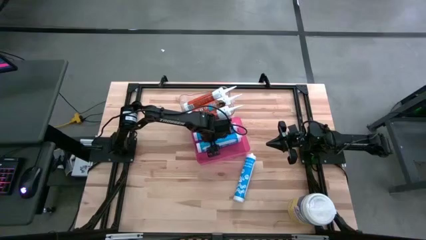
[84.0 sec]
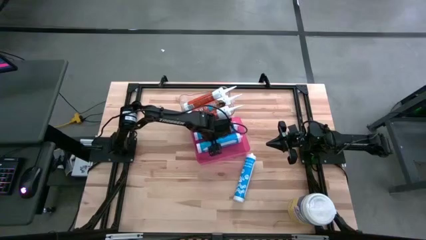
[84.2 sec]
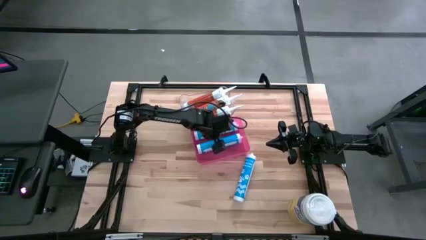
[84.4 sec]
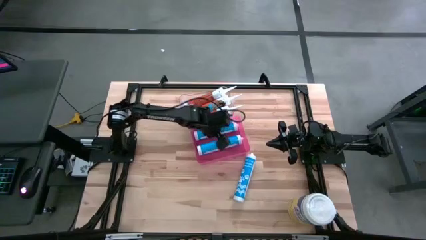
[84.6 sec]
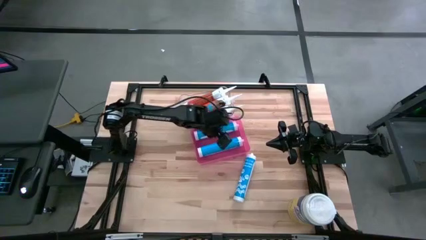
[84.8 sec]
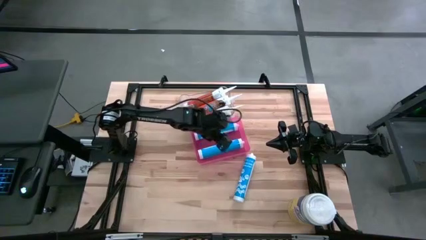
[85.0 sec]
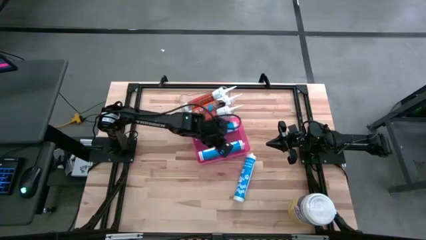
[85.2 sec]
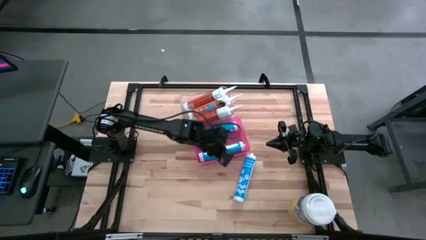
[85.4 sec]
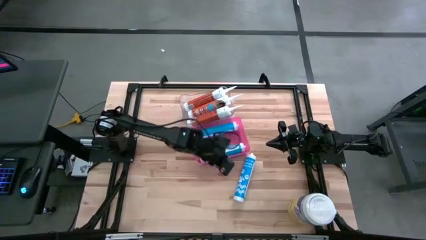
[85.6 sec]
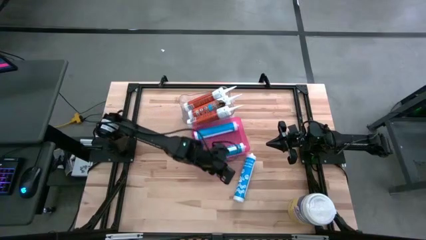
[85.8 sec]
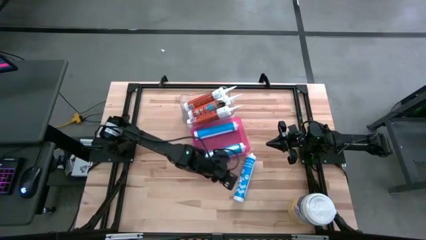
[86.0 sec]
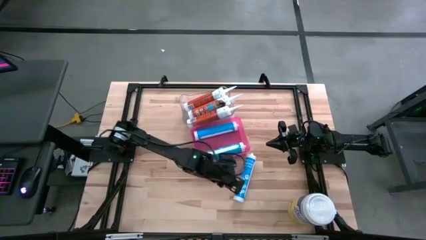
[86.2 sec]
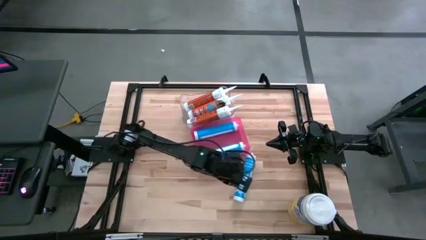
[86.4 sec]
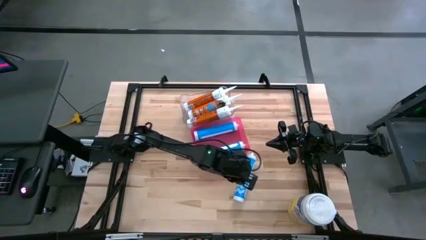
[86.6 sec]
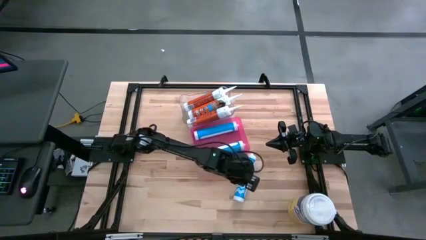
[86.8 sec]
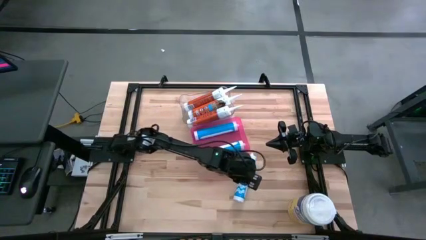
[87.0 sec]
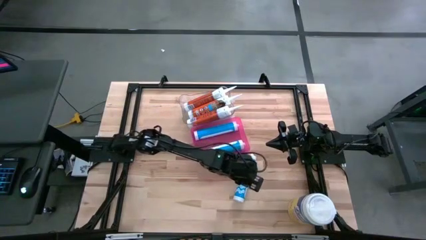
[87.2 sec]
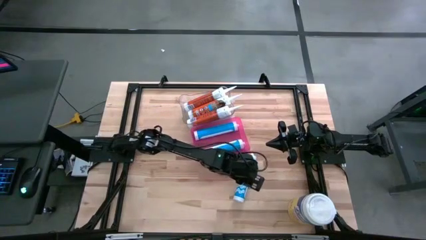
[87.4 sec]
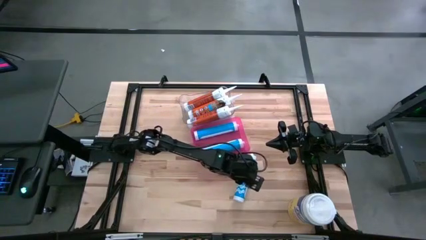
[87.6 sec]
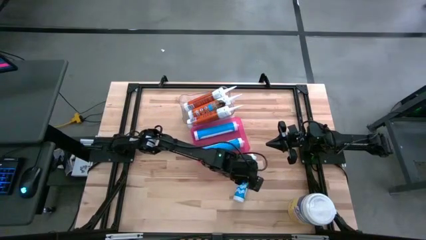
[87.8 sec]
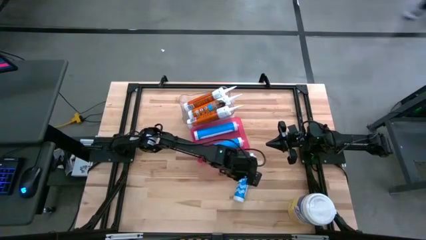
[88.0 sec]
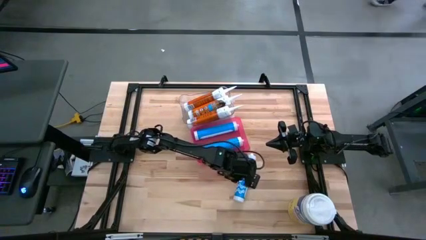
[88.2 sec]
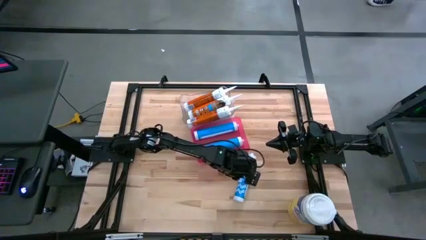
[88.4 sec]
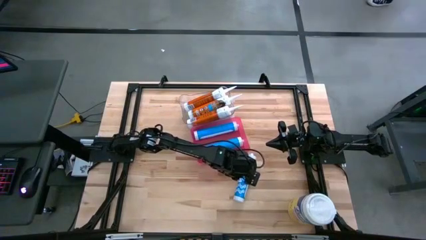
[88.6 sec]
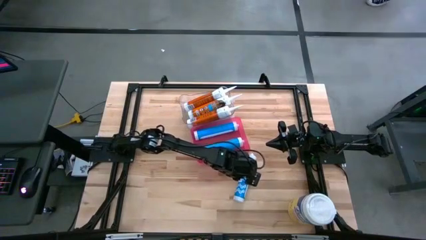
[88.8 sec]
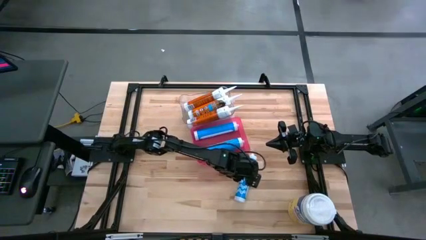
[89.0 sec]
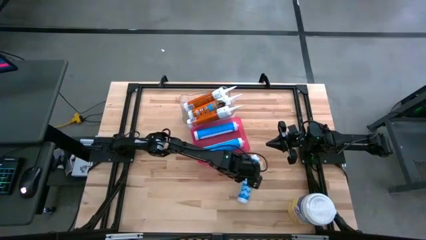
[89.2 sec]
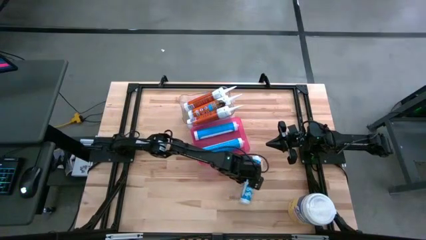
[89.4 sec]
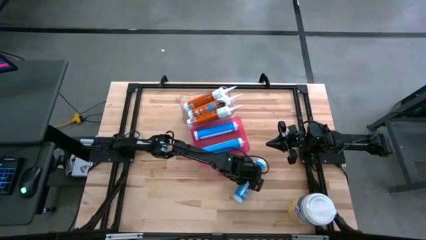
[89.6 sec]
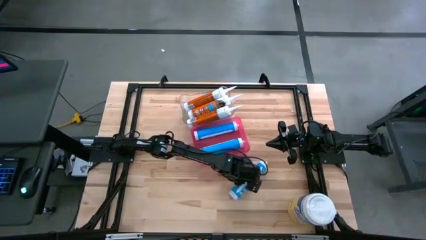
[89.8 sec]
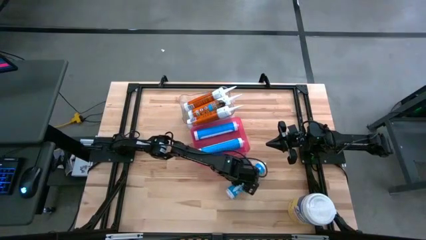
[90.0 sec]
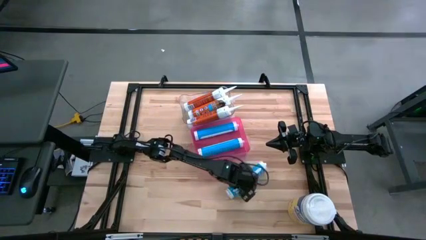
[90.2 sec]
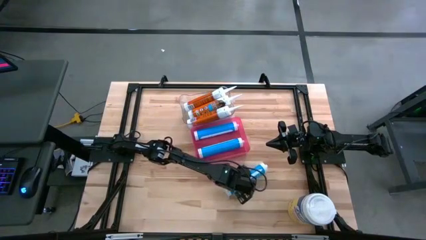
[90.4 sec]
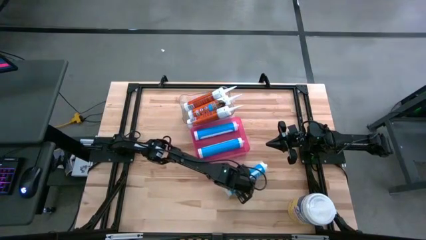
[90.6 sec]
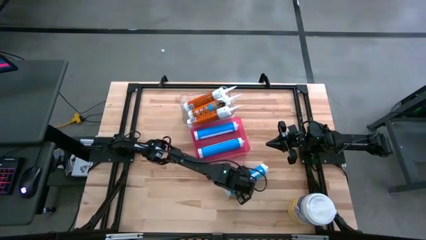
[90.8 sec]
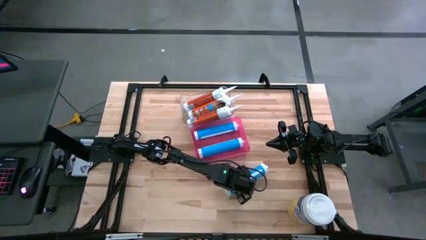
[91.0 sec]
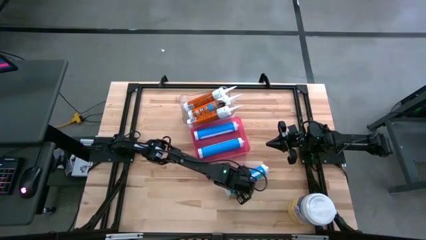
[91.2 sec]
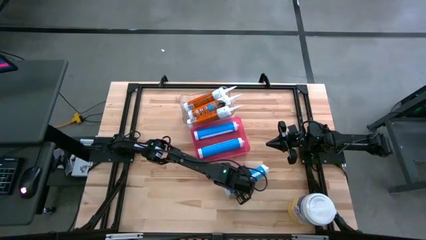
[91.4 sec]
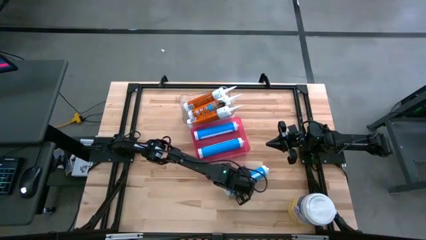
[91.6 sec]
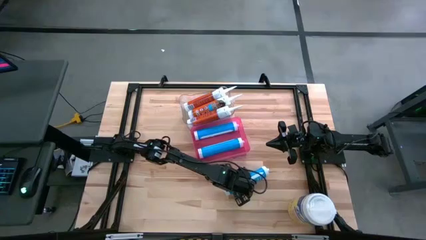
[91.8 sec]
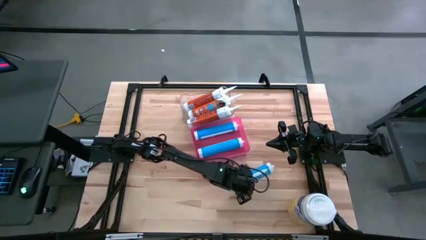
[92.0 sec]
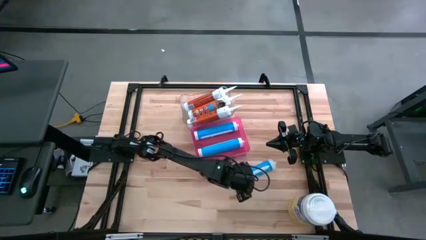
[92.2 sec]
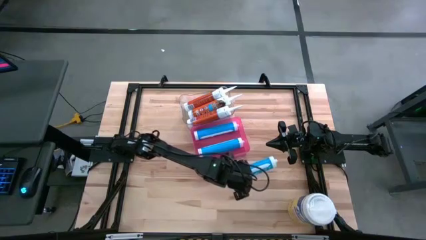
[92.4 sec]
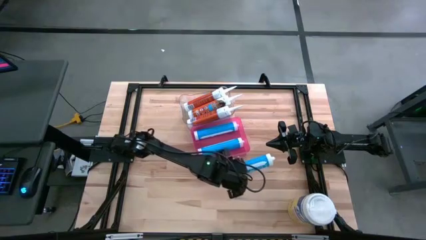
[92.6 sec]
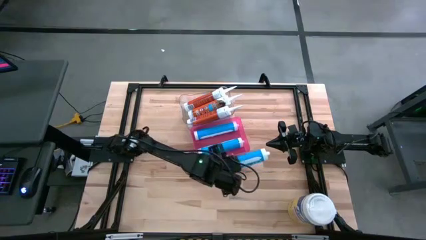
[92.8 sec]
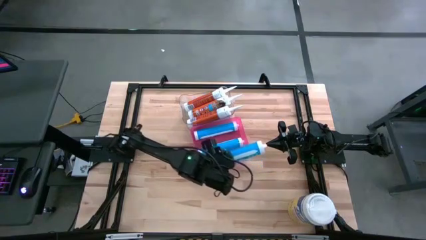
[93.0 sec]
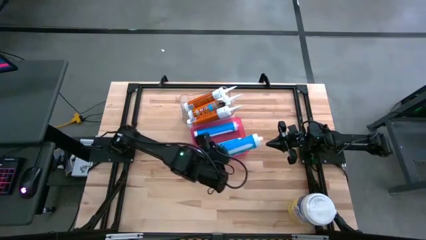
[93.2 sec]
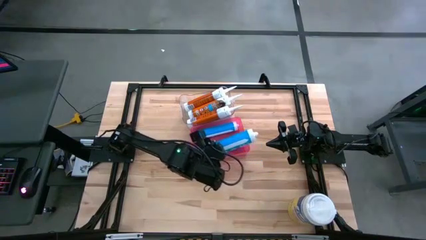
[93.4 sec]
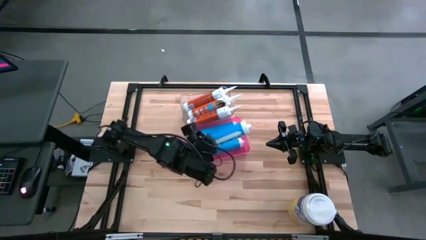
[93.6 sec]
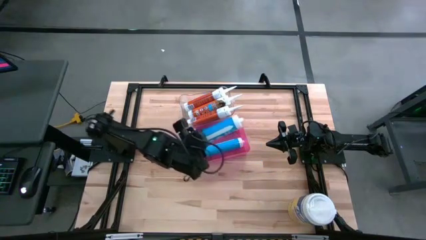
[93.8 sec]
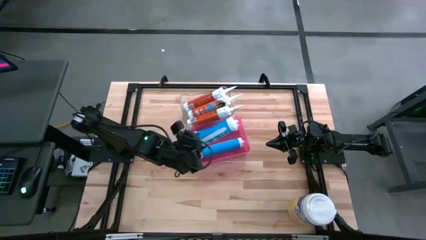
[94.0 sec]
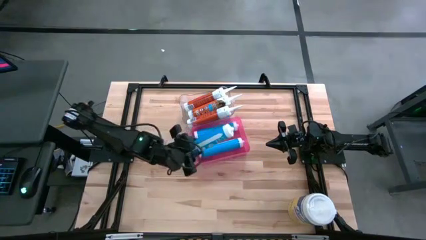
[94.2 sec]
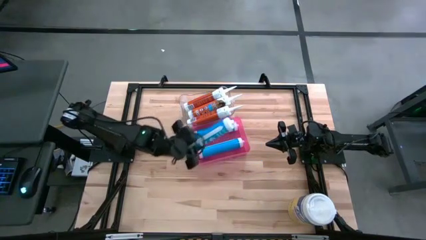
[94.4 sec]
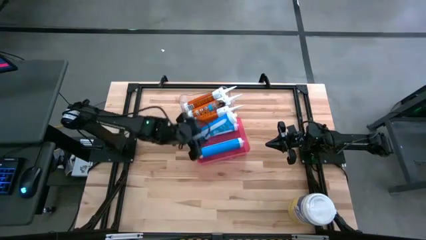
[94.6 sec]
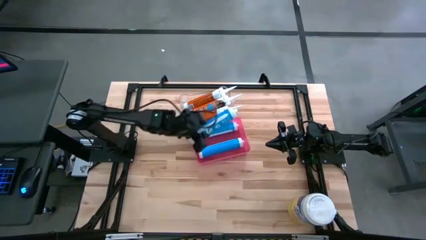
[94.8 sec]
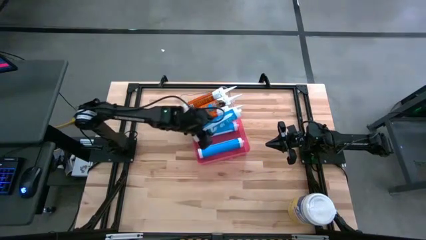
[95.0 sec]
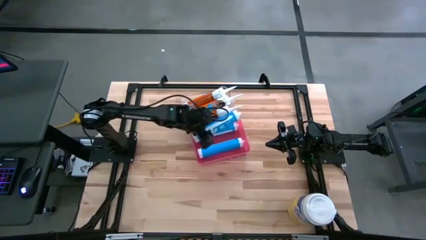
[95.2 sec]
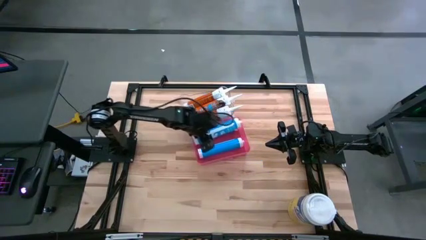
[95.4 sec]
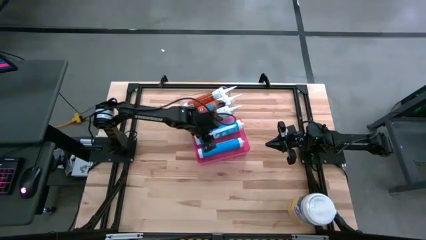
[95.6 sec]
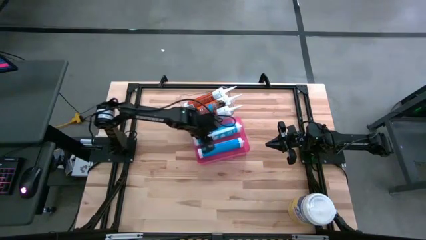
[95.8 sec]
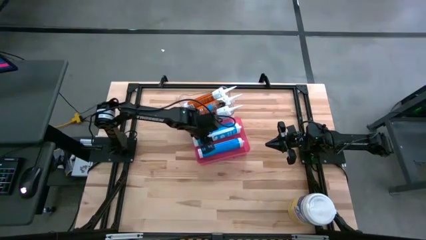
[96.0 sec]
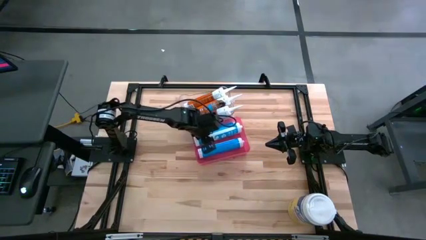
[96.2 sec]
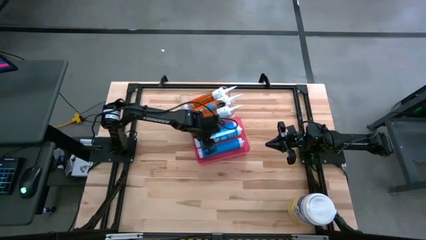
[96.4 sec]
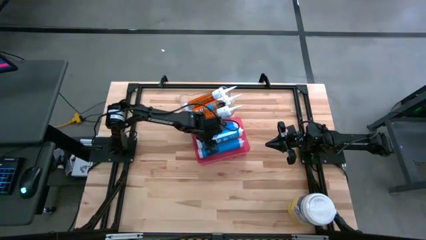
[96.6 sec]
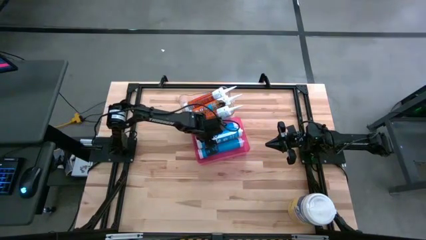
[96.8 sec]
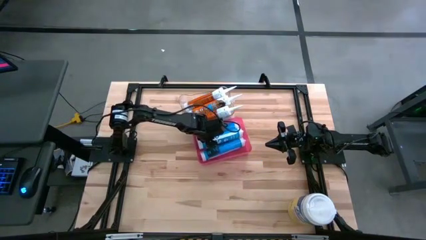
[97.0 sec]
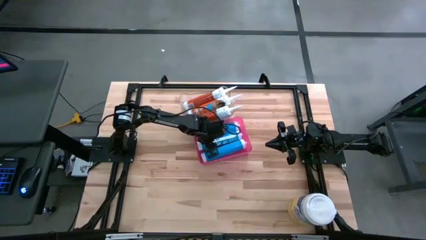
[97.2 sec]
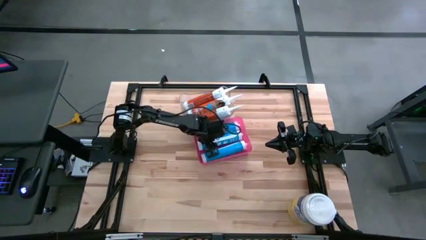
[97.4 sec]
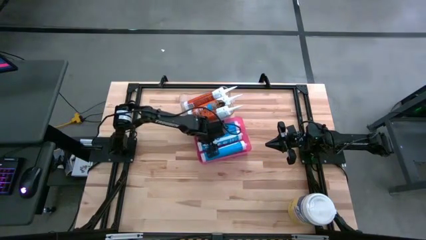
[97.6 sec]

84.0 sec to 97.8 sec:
Task: Pick & place silicon tubes, Sealant and Lysol wipes
Put the blue sealant into the pink bin

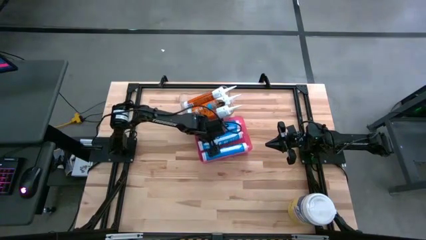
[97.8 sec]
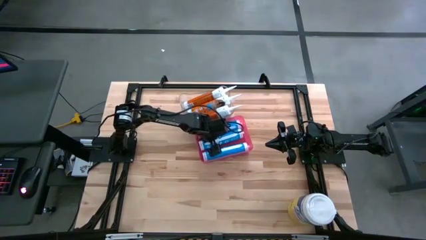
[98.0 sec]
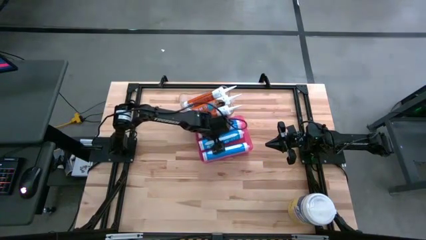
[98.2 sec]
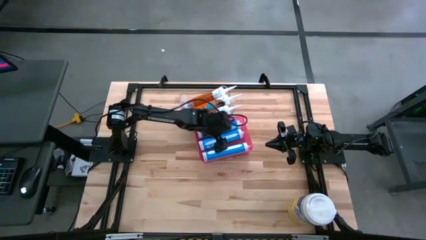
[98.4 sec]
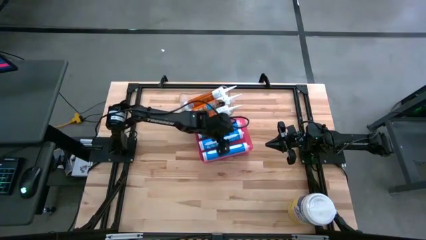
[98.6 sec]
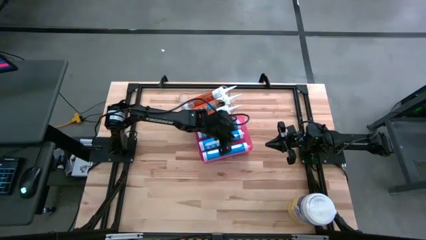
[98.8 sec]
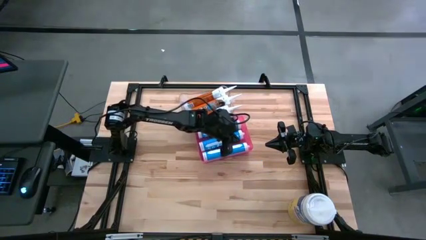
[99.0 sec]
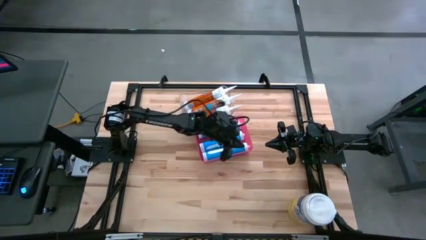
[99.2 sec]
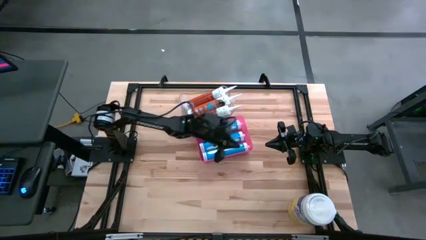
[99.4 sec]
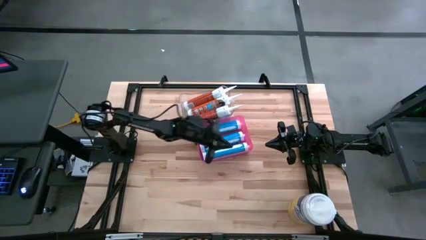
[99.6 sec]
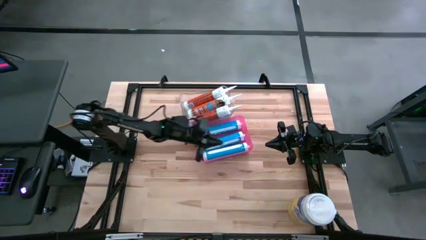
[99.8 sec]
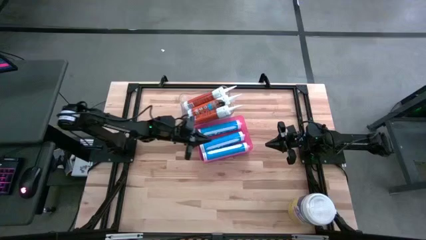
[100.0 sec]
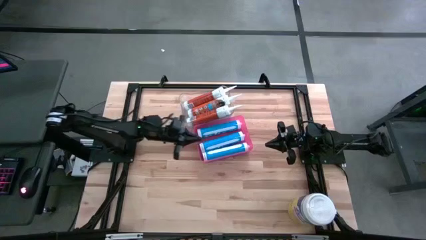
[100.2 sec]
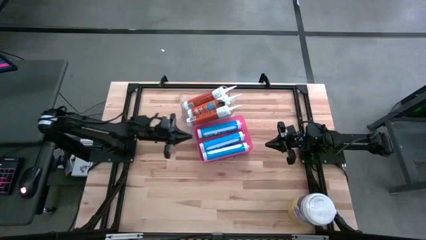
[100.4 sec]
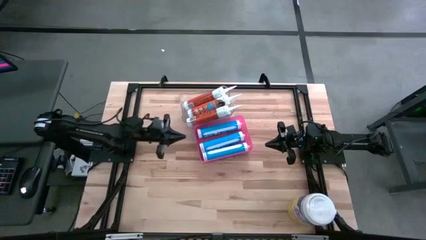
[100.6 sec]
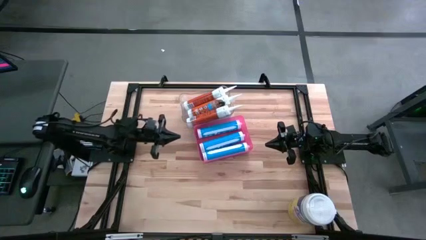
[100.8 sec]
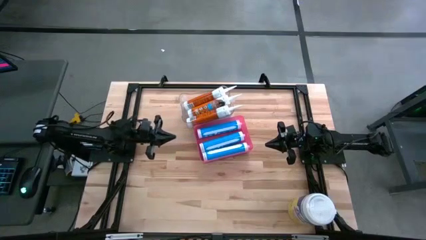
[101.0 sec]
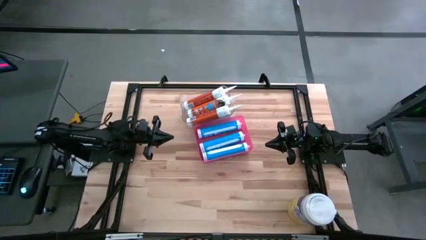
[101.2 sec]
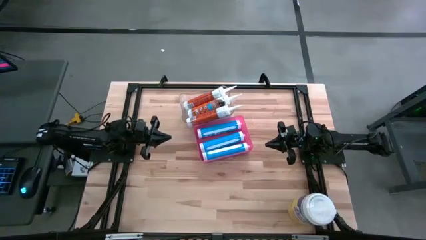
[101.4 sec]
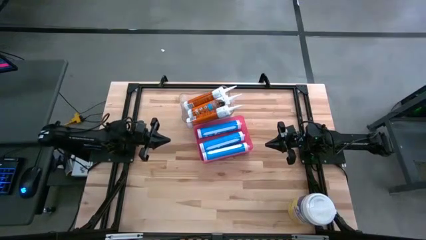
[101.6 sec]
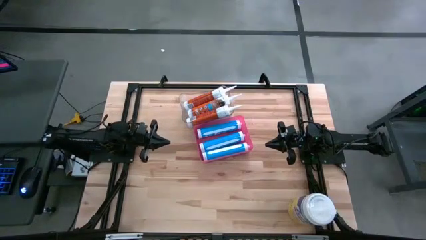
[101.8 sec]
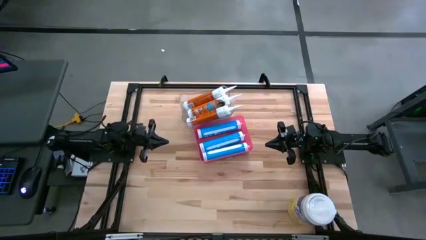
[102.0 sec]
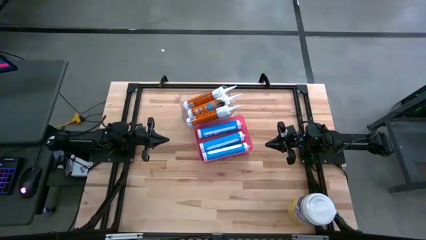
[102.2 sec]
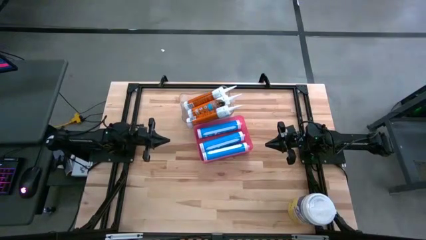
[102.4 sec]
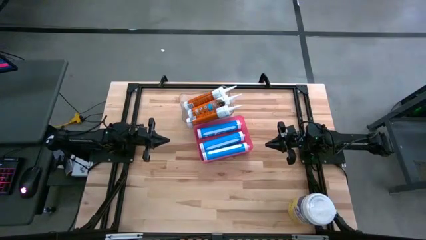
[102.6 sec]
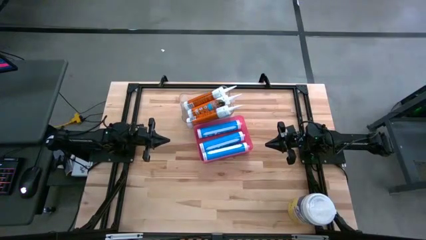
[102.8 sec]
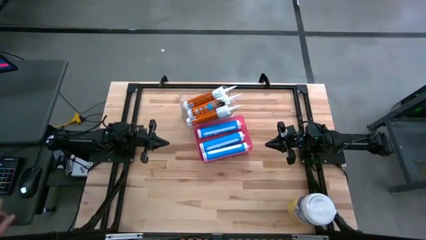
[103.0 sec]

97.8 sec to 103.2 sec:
Return to Home Position
